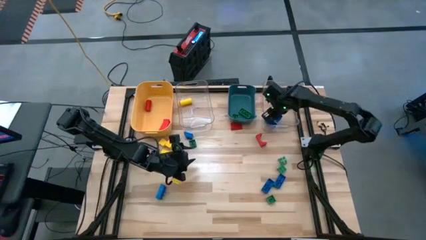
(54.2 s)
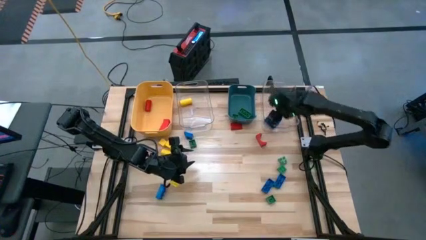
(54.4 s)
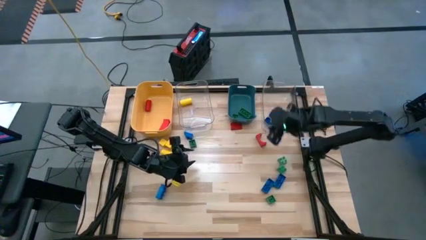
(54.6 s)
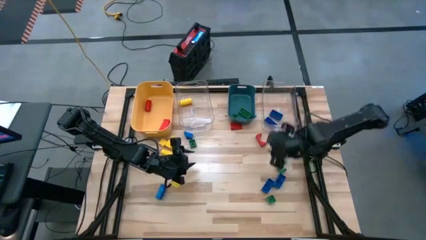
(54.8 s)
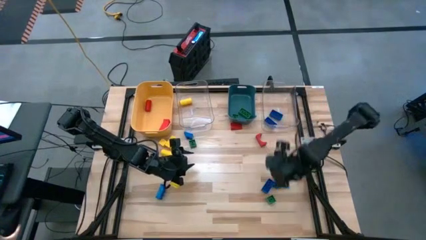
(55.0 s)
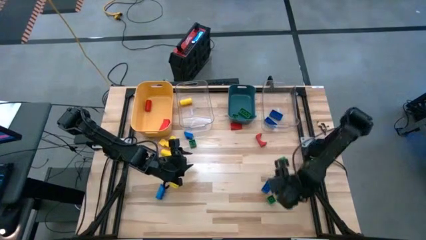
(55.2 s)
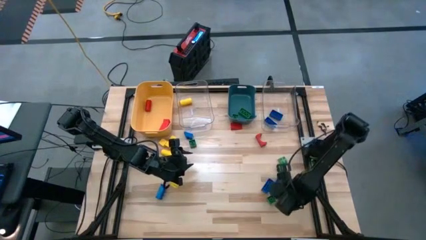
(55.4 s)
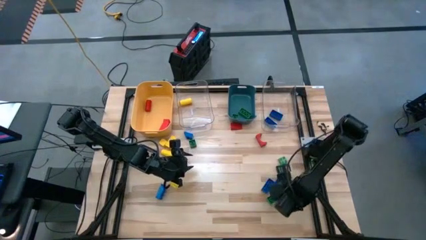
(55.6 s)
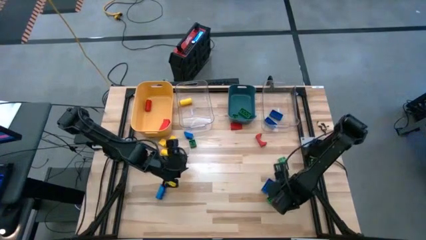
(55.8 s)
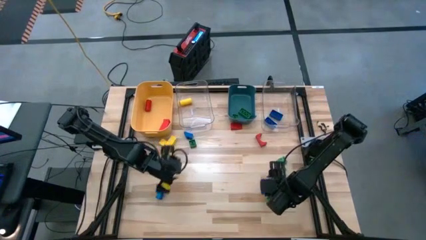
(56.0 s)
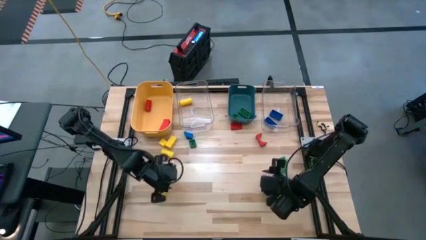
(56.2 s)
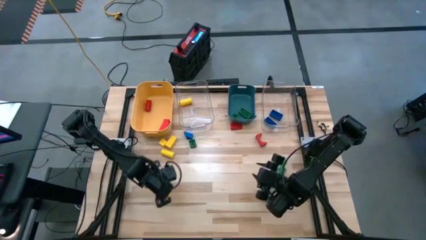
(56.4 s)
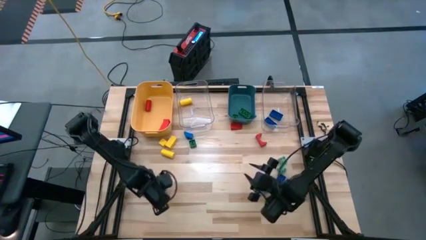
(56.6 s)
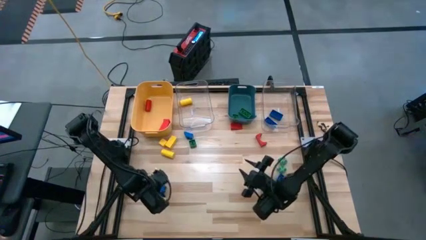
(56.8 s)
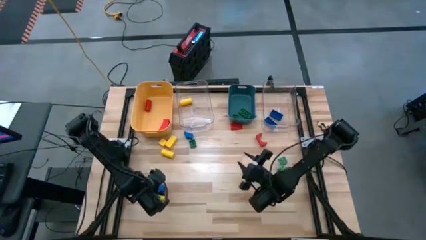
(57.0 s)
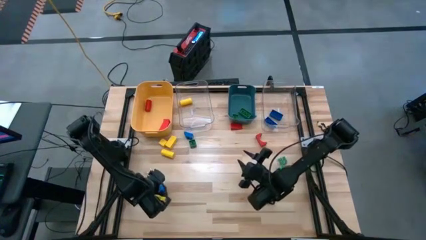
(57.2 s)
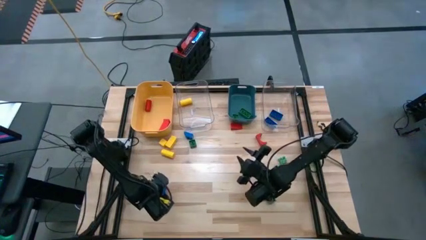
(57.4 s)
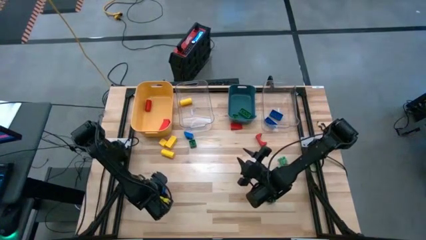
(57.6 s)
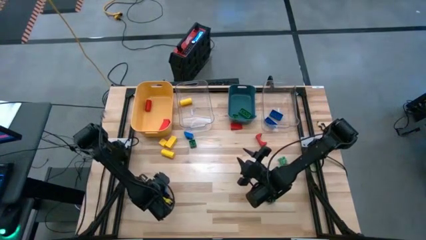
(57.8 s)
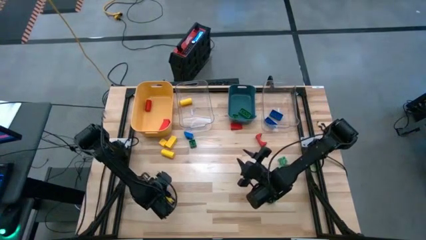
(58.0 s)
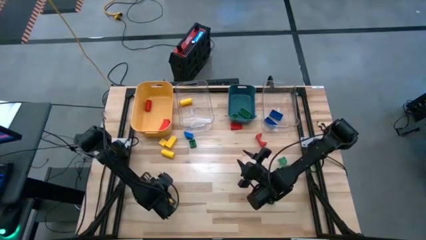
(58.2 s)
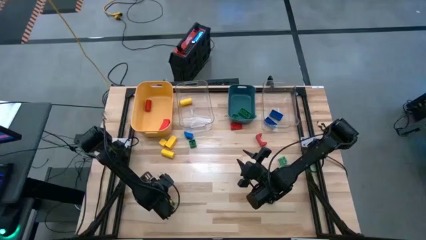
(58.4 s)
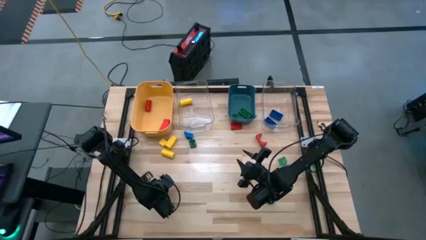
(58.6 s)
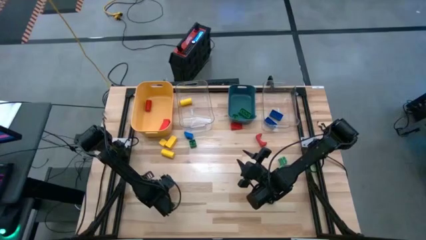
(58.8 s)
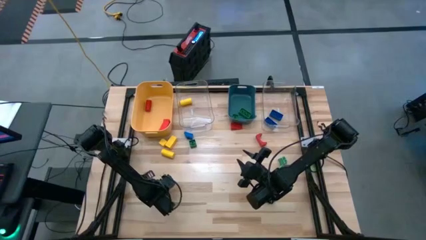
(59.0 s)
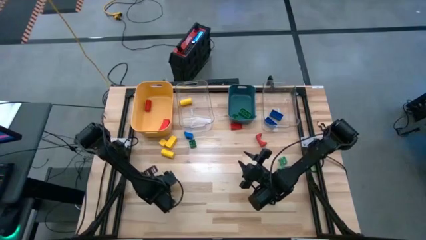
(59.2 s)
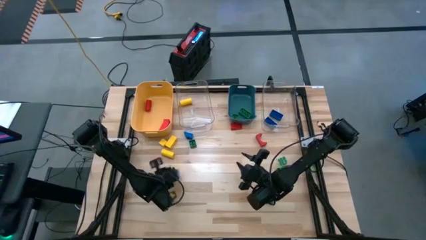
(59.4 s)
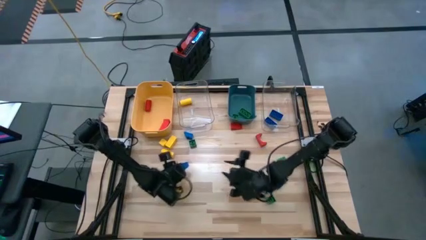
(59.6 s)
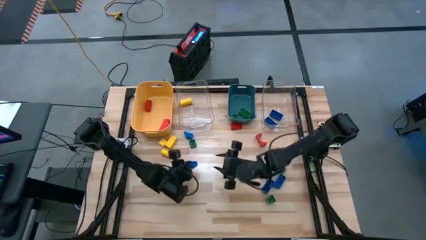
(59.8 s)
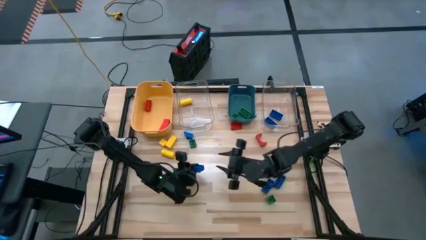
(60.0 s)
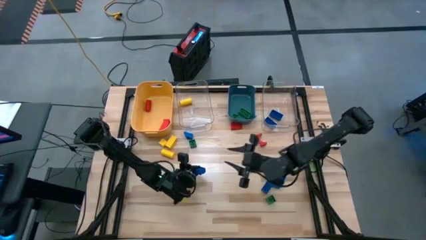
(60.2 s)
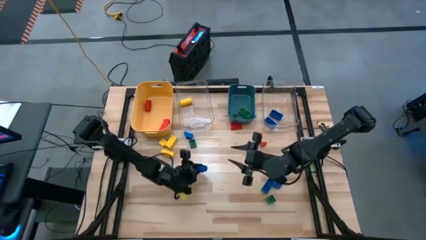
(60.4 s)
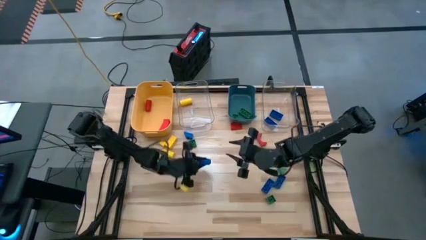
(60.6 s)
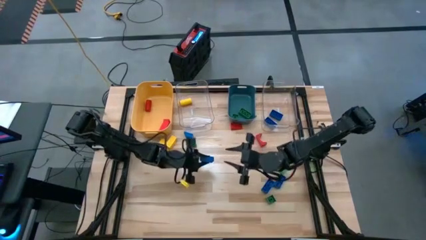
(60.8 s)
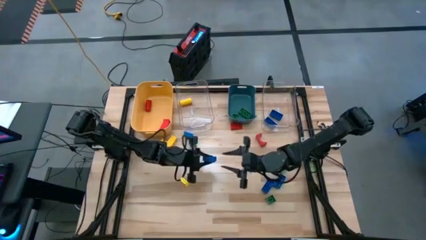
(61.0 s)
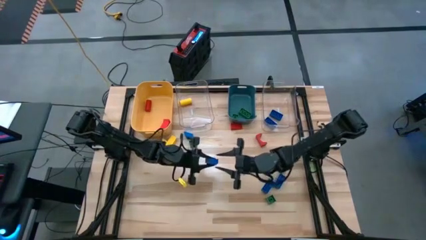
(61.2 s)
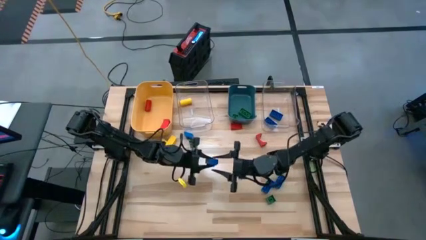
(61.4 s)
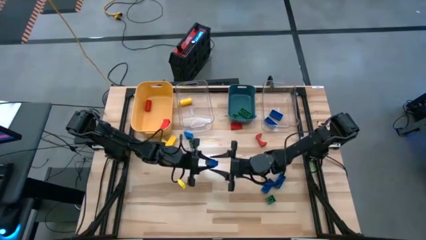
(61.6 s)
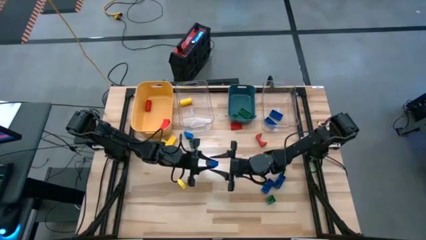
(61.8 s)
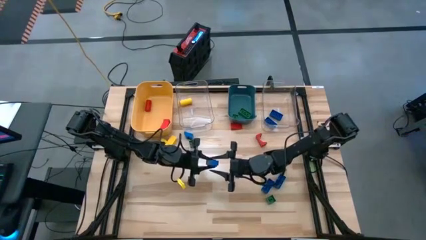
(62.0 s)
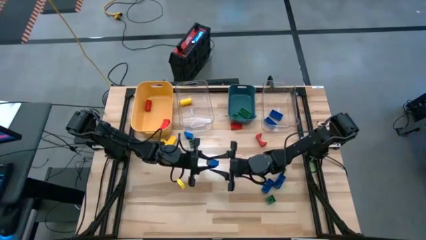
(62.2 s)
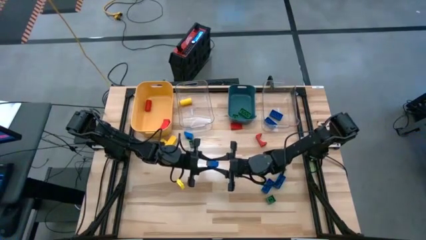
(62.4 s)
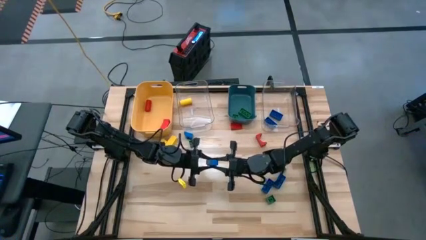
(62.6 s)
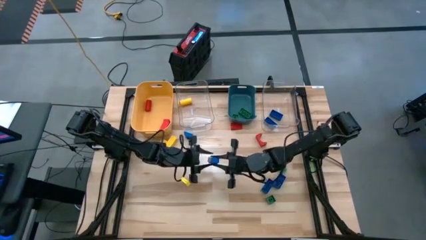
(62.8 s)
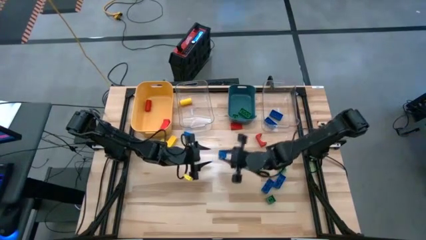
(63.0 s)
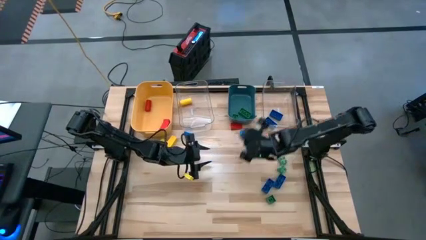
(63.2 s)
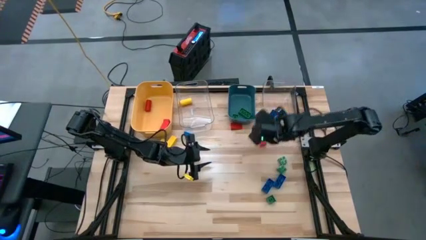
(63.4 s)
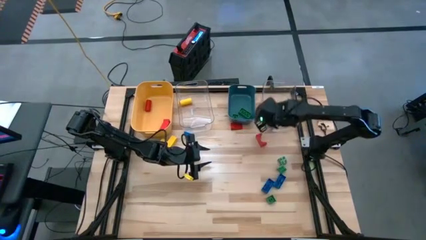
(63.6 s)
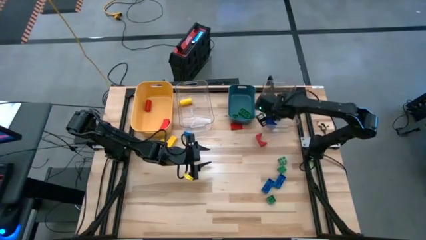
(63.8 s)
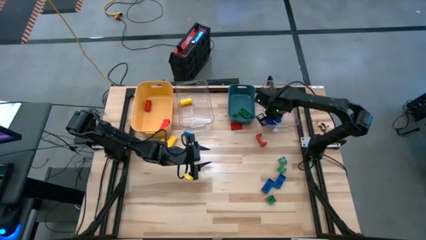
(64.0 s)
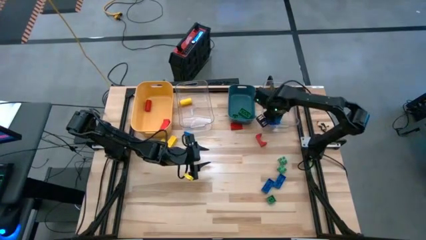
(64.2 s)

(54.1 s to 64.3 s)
Task: Sort blocks
Put the blue game piece into the right transparent bin

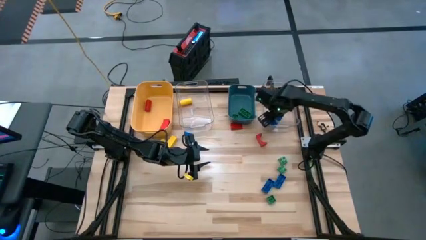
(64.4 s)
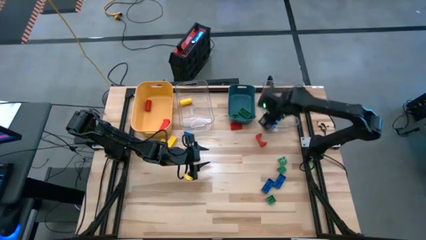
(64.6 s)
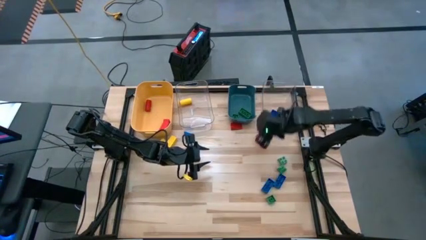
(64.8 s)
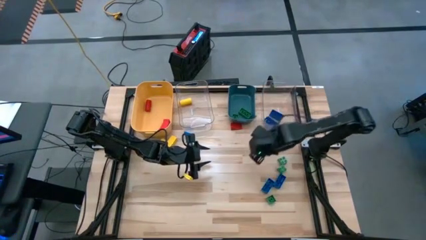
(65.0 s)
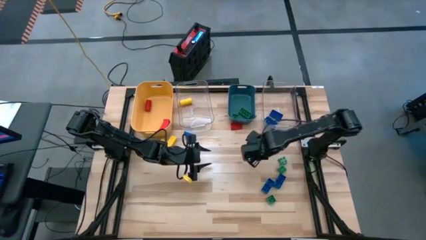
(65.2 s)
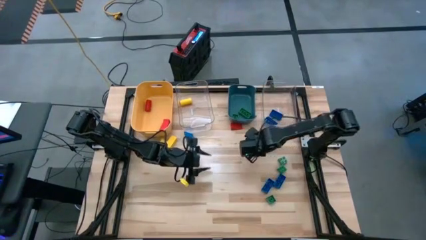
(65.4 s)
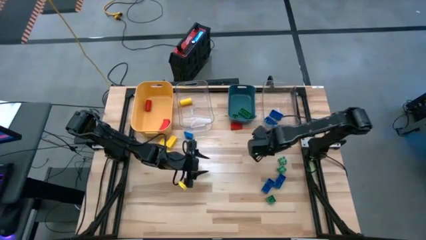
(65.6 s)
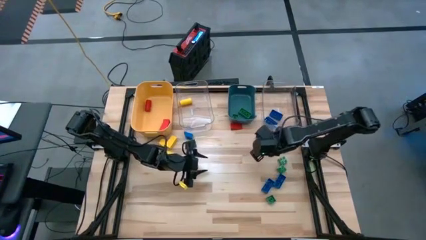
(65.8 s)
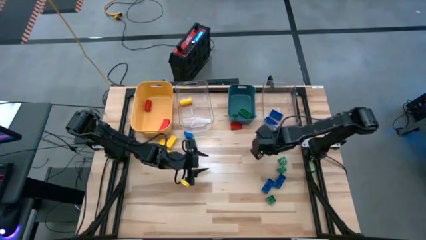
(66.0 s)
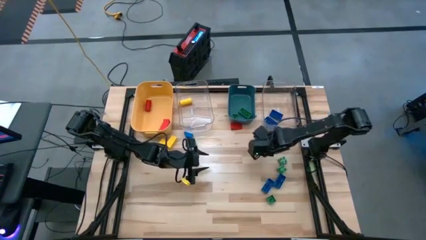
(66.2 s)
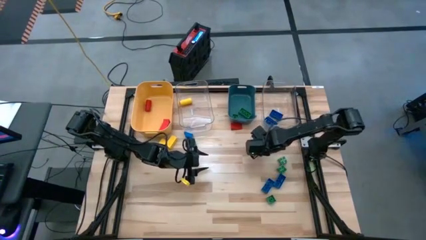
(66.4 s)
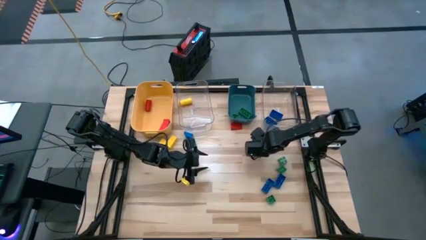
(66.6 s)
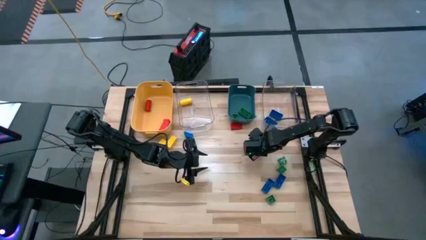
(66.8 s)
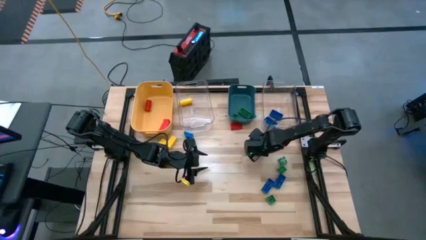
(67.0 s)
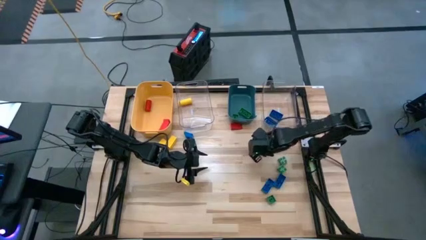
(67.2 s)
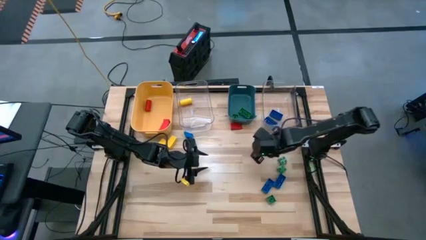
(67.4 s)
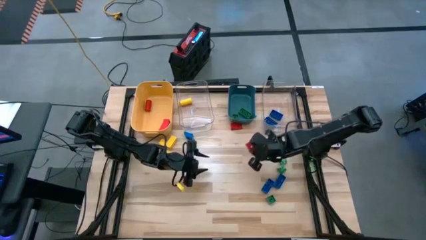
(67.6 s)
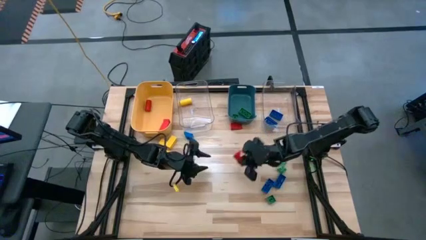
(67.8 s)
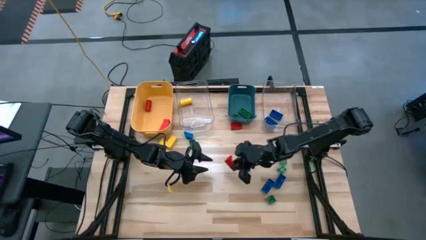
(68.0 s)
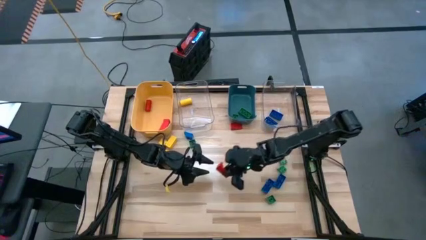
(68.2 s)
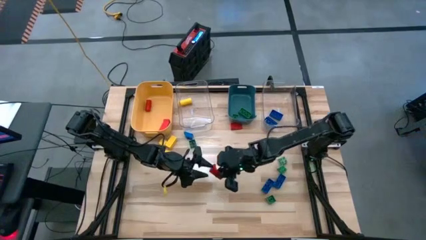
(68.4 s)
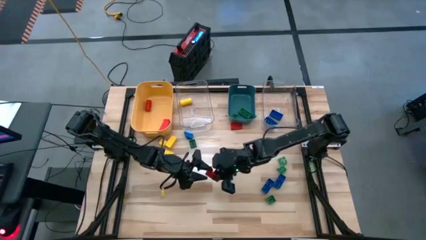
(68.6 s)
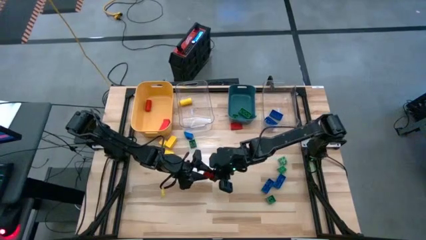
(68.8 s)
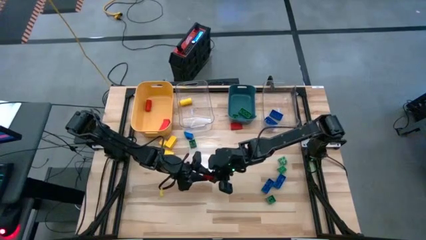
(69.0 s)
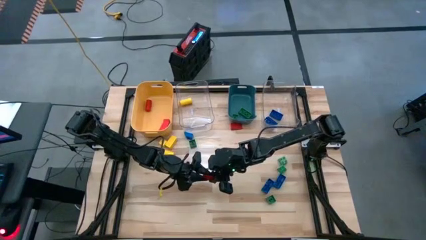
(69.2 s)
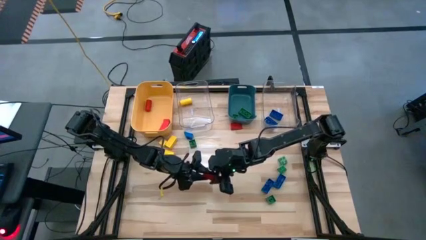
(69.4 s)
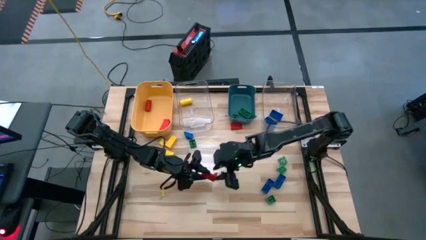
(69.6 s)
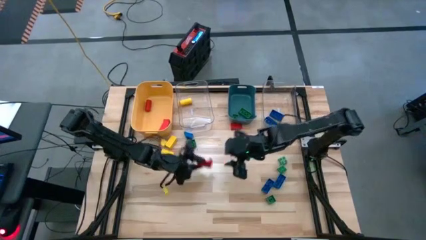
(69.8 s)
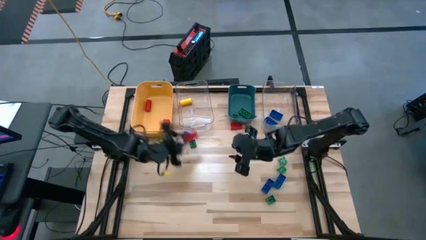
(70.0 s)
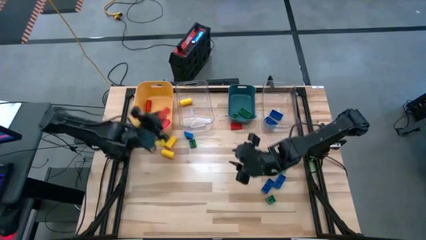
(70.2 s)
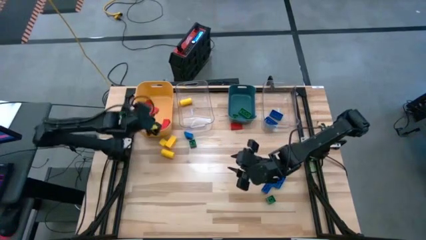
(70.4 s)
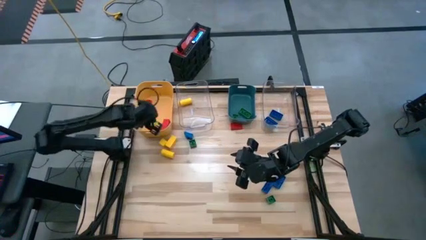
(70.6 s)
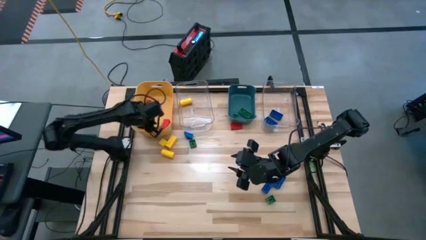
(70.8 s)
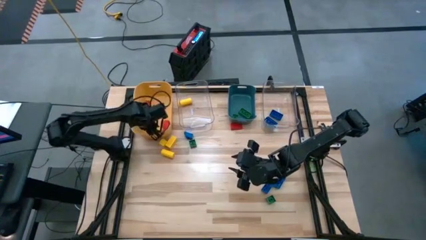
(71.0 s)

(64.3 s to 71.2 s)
Put the red block into the yellow bin

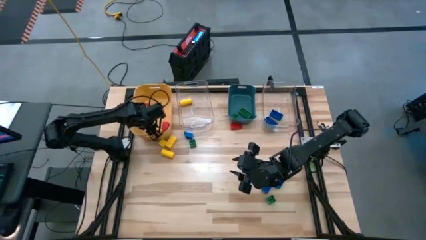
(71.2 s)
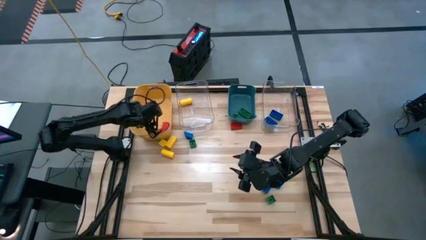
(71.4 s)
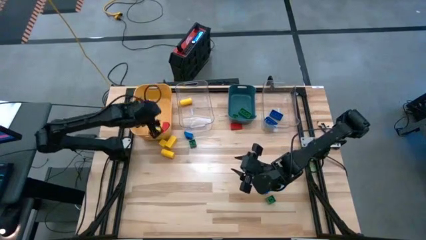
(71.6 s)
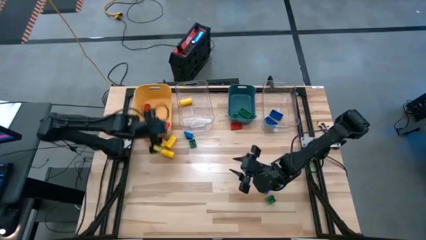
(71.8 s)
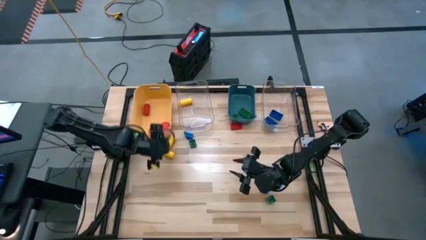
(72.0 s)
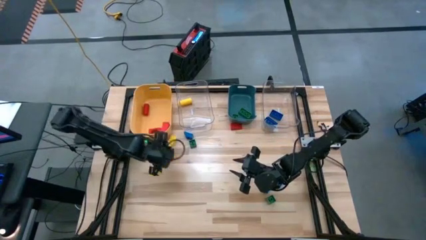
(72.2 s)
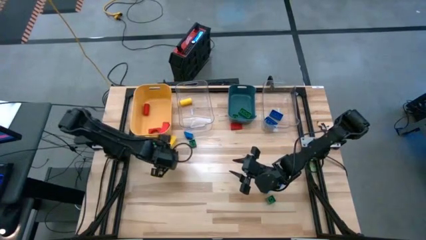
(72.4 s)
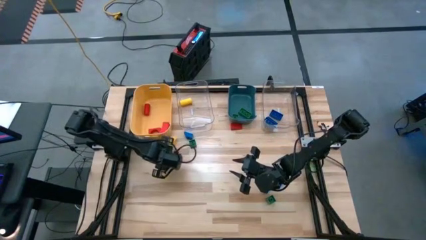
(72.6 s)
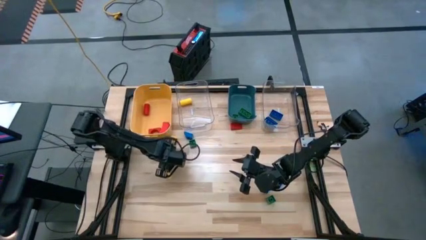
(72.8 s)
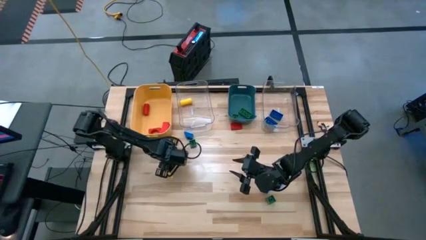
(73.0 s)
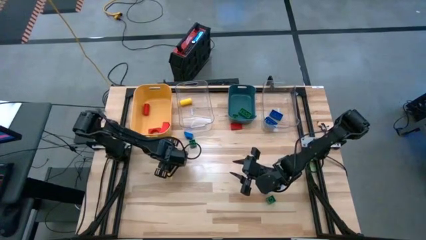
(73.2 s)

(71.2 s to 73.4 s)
Put the yellow block into the left transparent bin
